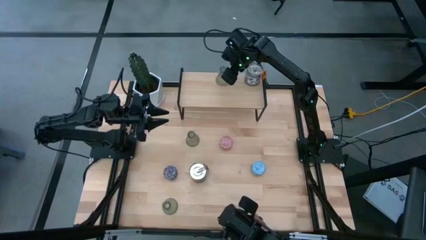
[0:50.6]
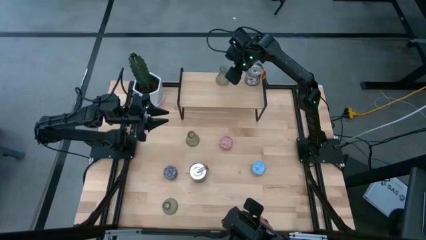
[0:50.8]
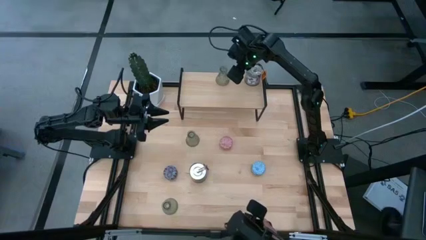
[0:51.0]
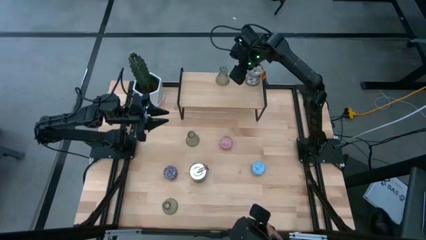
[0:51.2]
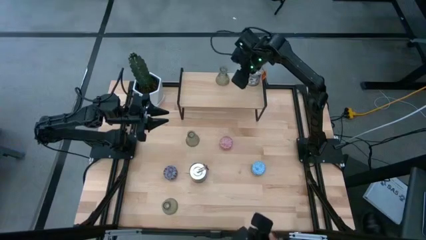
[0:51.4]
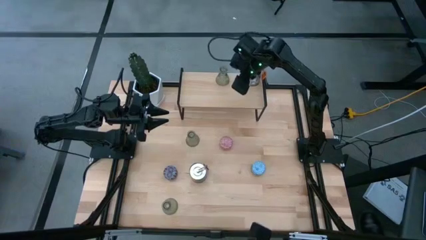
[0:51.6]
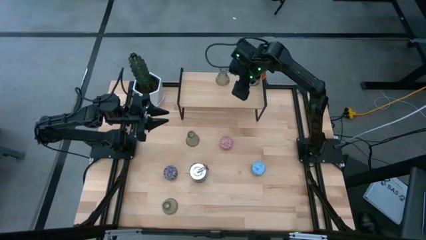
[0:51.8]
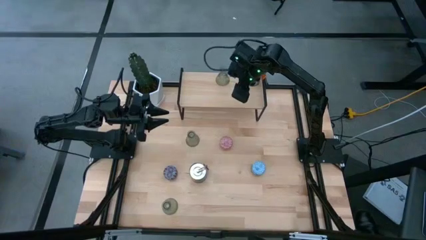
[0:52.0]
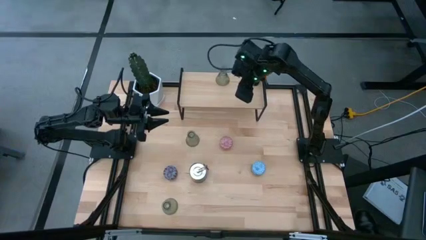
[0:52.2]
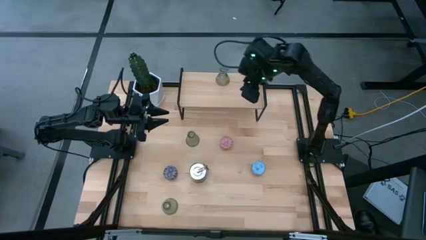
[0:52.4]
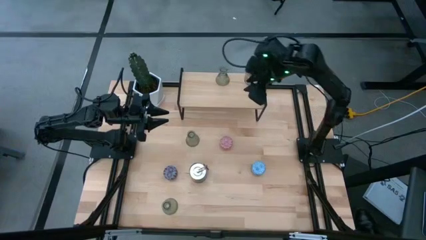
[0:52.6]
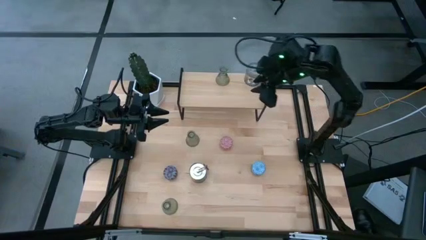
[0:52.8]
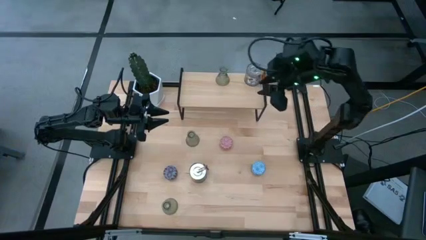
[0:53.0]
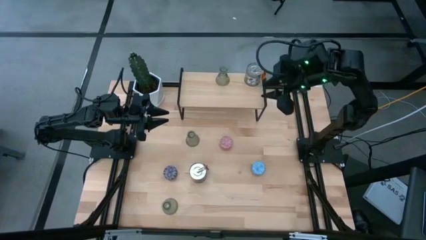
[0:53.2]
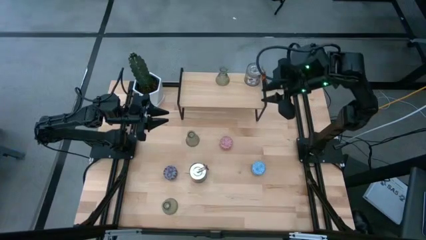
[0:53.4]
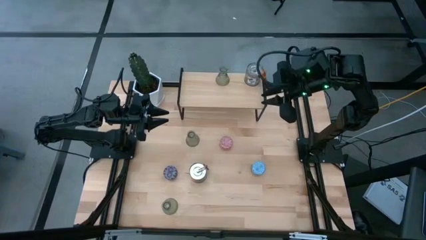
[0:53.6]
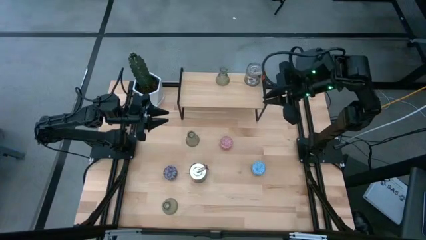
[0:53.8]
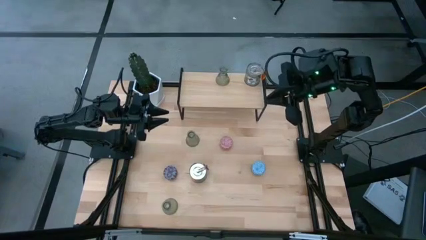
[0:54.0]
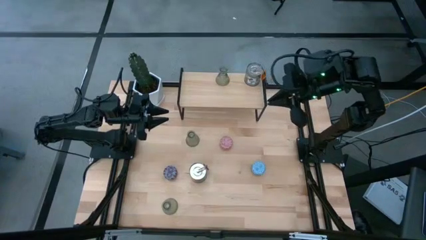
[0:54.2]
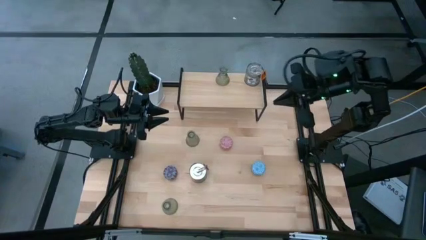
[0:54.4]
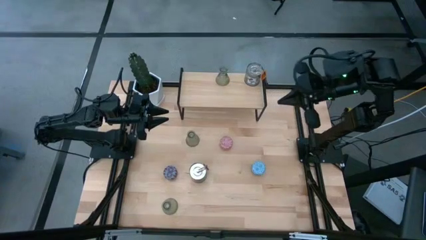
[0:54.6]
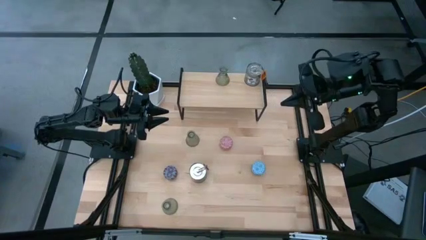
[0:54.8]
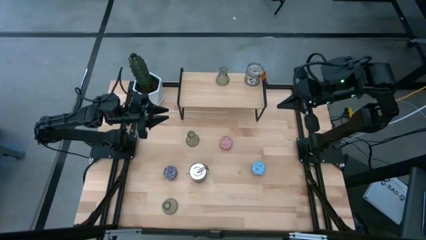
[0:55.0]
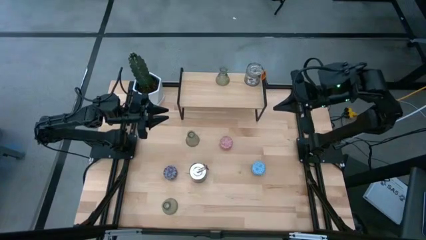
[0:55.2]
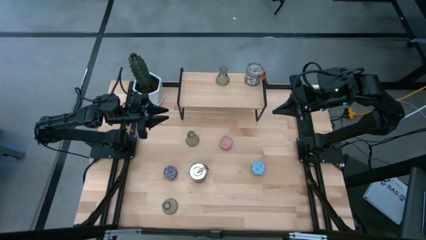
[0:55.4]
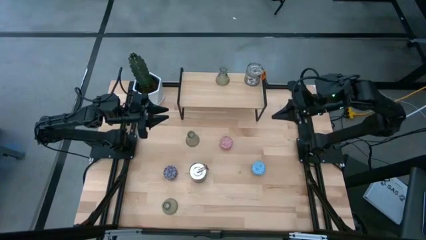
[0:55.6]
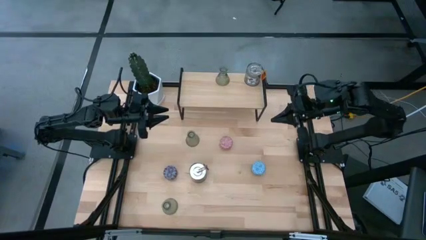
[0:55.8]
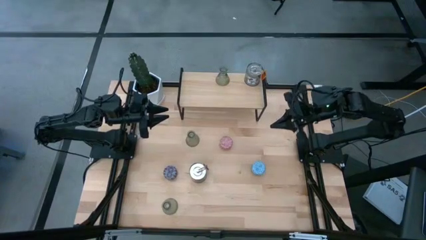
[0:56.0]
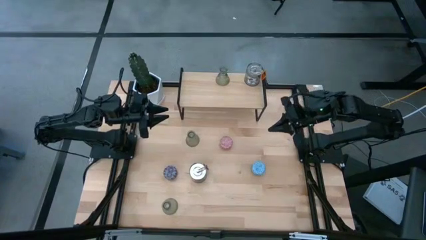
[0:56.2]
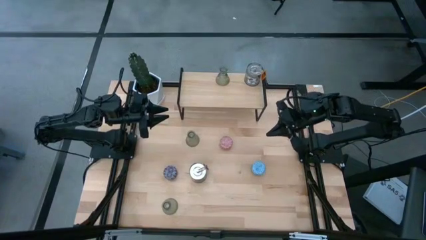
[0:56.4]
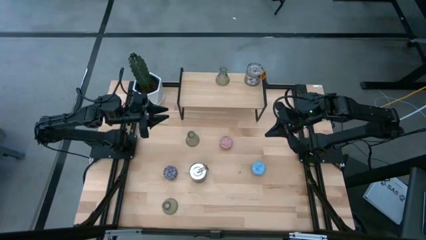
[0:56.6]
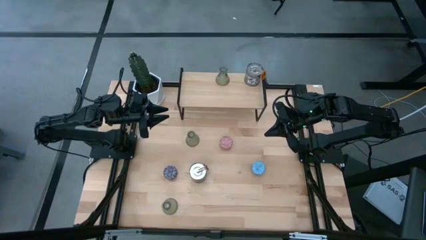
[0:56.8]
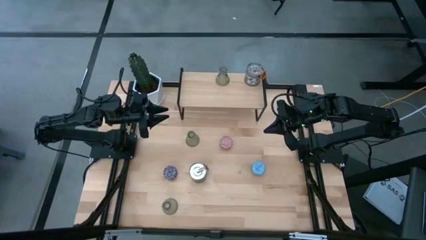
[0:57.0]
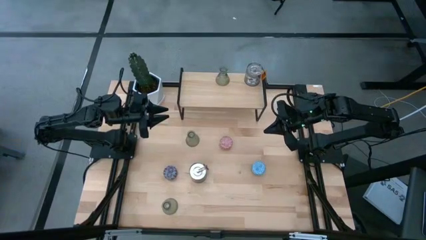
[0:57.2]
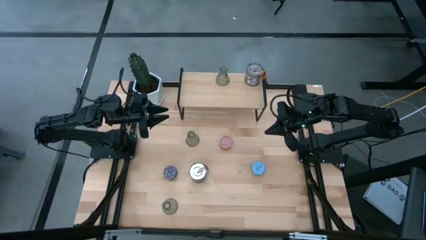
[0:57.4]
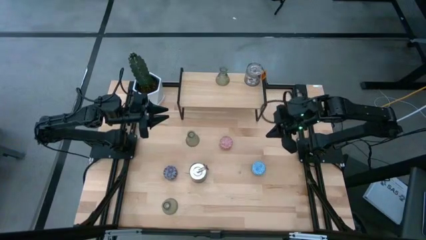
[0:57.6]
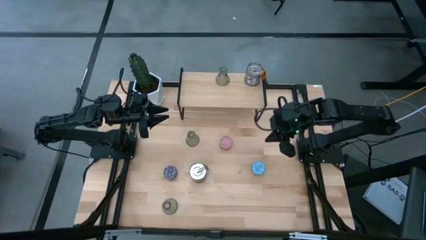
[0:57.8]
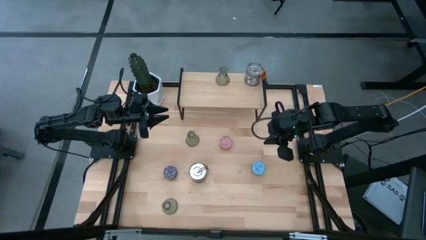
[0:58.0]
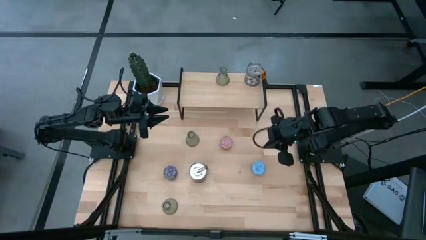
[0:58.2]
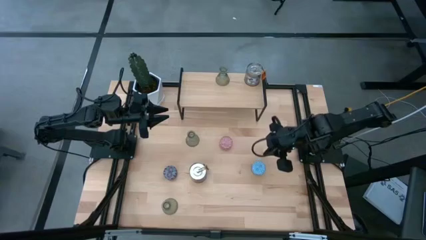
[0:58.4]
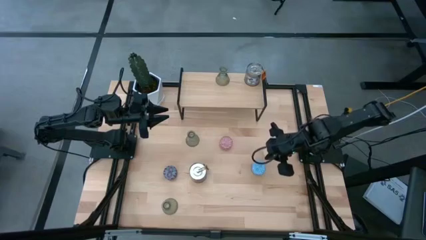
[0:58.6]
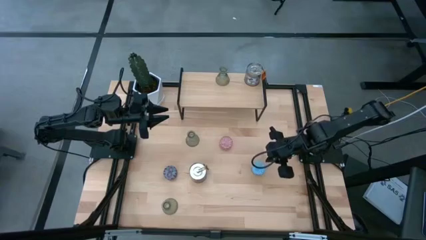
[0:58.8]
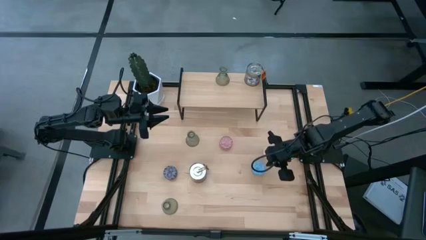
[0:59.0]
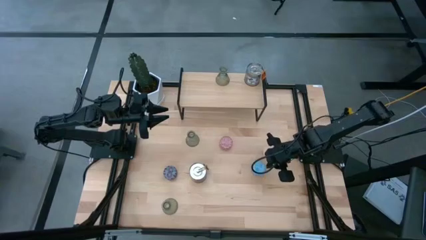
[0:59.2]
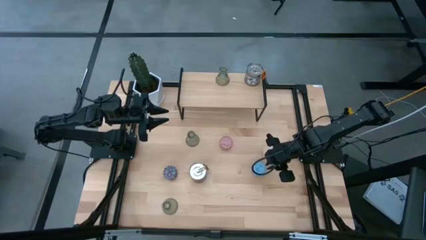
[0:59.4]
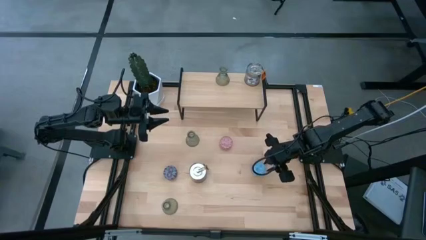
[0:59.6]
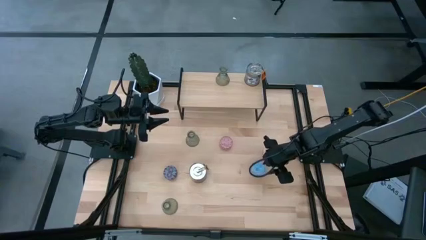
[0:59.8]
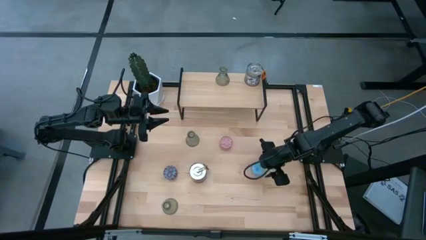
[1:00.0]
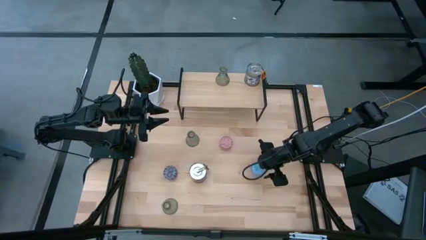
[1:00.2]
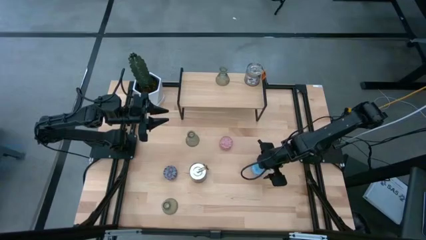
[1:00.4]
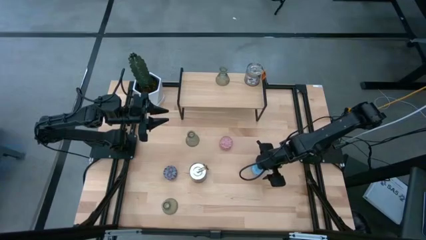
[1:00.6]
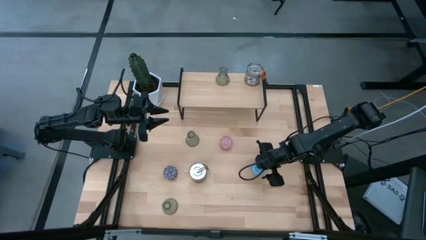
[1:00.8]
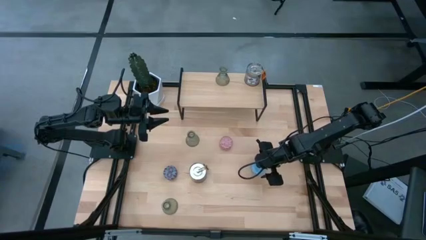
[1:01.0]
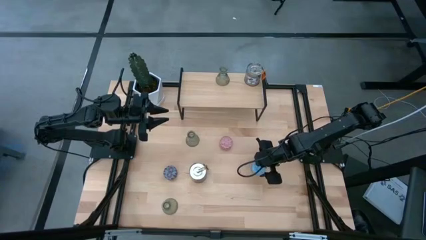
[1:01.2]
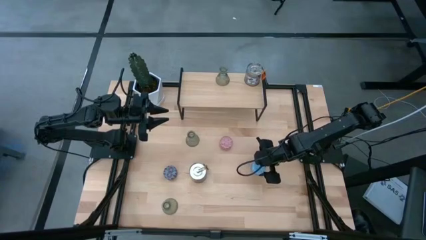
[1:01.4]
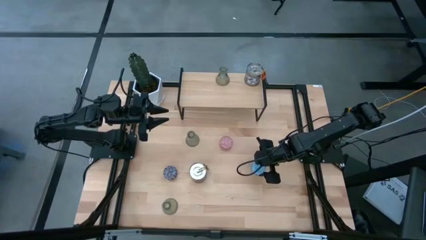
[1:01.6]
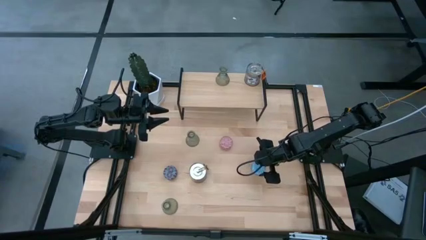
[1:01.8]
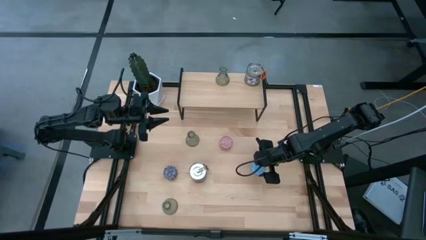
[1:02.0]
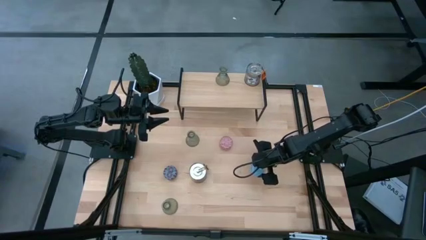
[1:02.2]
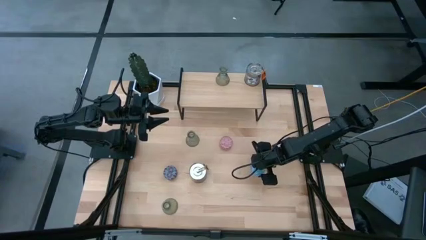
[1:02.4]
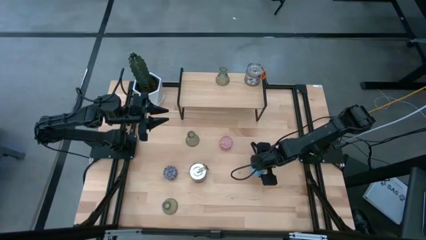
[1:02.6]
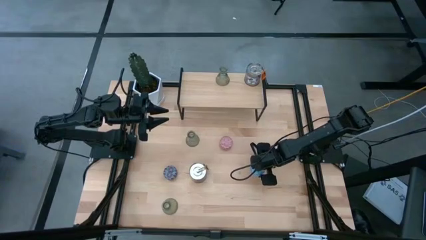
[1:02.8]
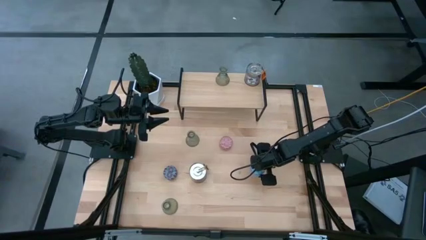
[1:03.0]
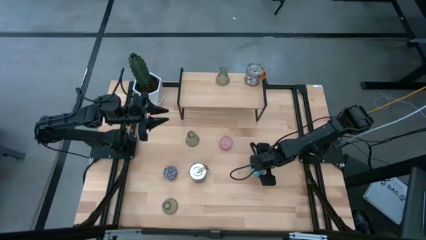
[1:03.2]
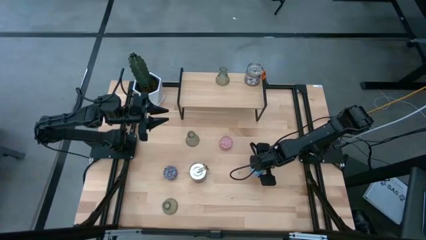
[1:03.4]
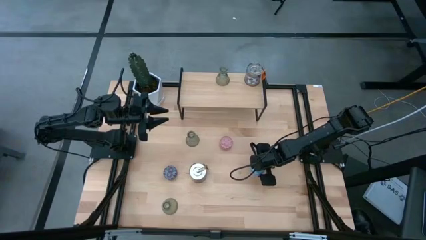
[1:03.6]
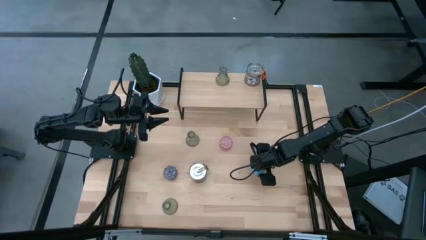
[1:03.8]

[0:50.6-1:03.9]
Task: Pick & Place candle stick holders
Put the blue scented candle on the shelf
